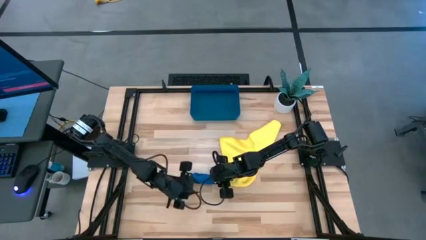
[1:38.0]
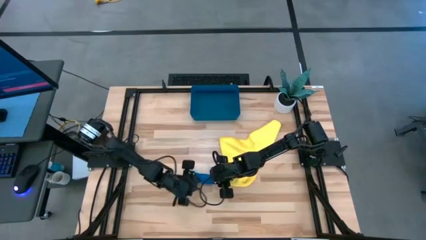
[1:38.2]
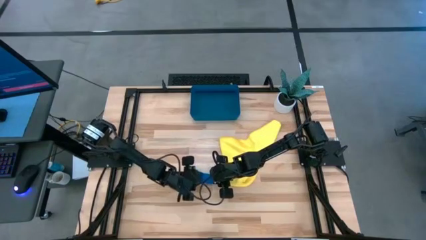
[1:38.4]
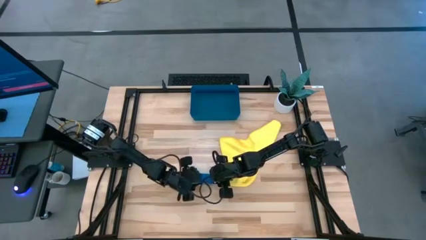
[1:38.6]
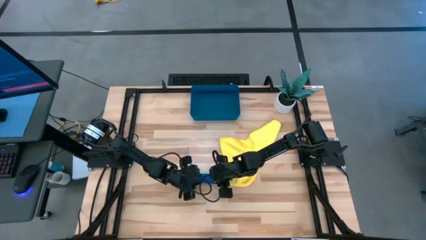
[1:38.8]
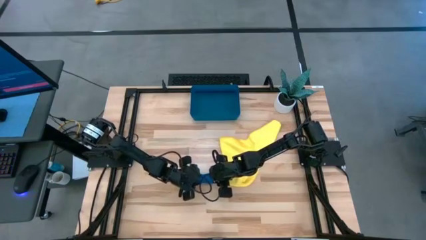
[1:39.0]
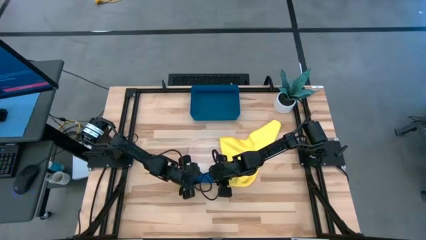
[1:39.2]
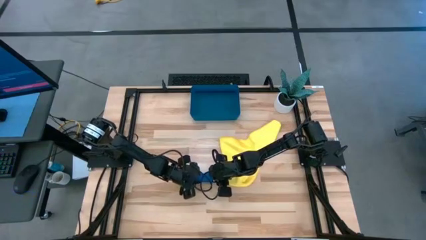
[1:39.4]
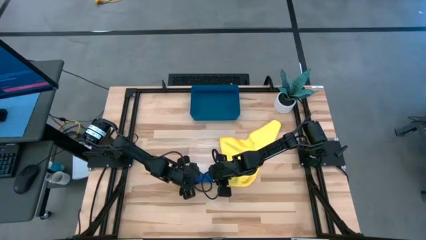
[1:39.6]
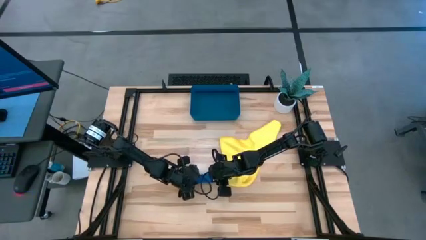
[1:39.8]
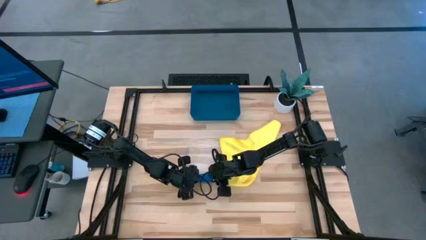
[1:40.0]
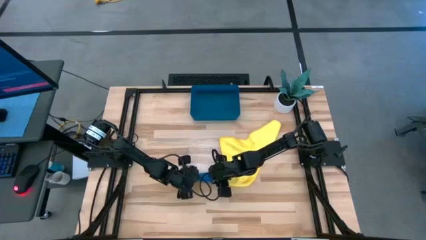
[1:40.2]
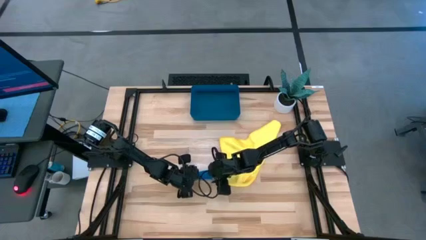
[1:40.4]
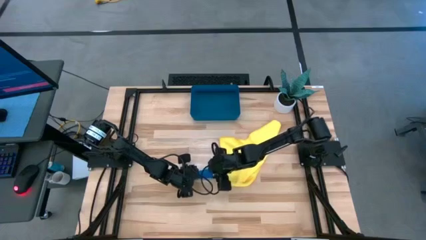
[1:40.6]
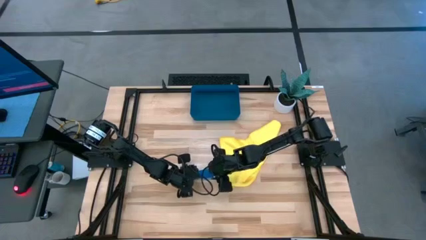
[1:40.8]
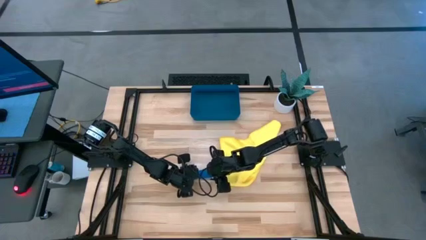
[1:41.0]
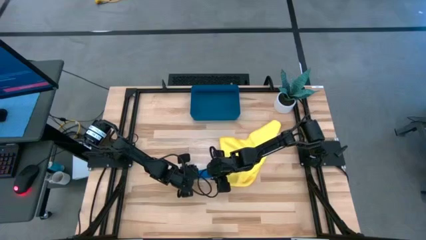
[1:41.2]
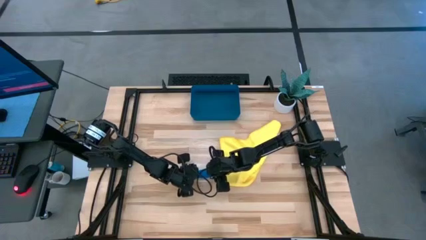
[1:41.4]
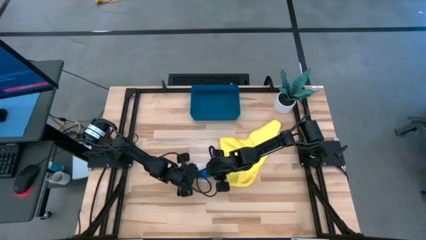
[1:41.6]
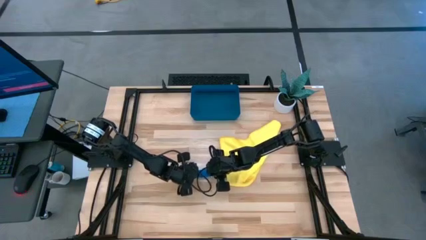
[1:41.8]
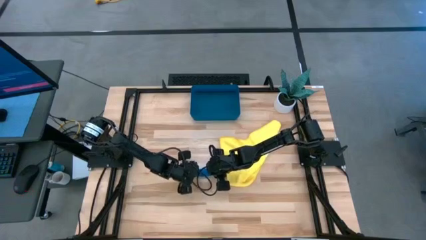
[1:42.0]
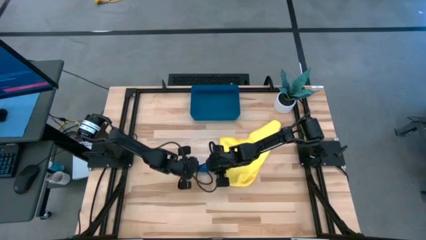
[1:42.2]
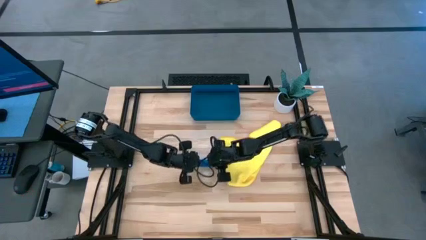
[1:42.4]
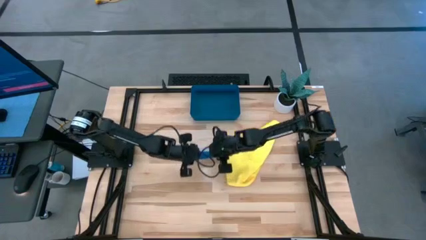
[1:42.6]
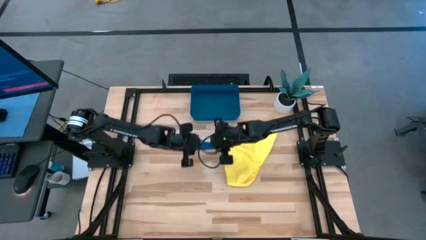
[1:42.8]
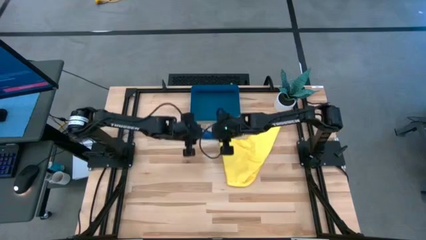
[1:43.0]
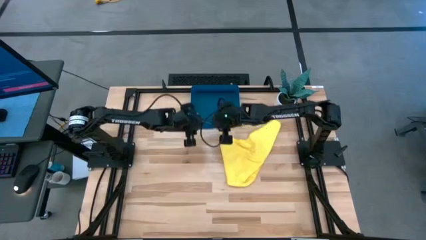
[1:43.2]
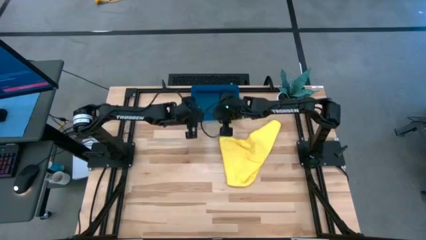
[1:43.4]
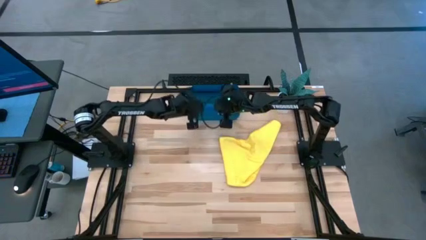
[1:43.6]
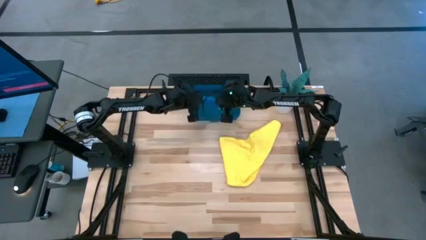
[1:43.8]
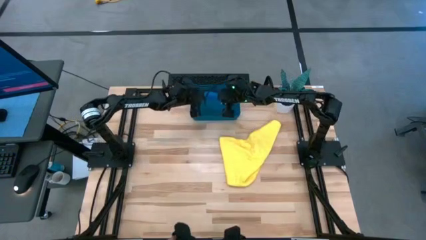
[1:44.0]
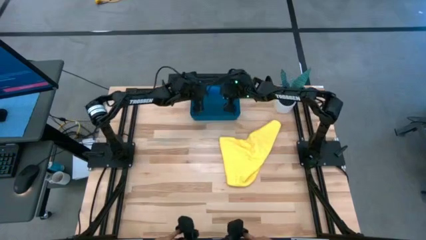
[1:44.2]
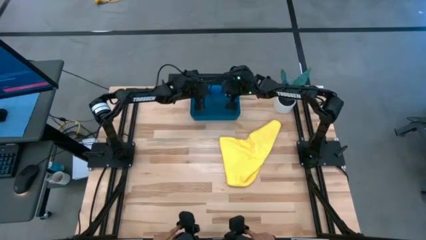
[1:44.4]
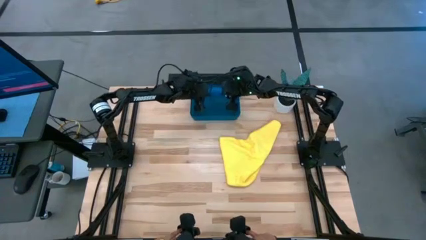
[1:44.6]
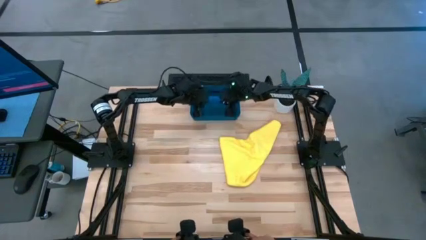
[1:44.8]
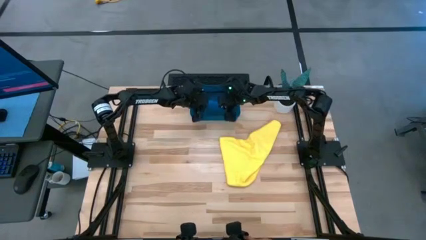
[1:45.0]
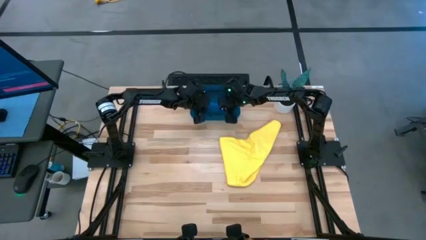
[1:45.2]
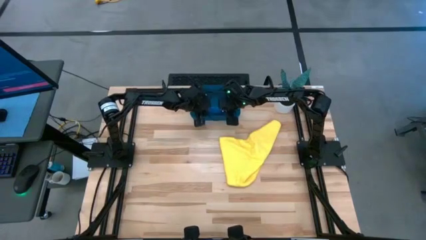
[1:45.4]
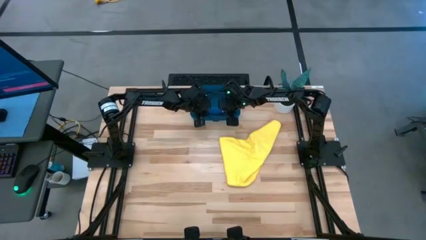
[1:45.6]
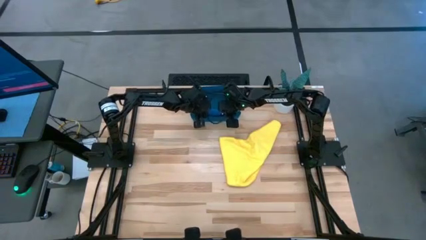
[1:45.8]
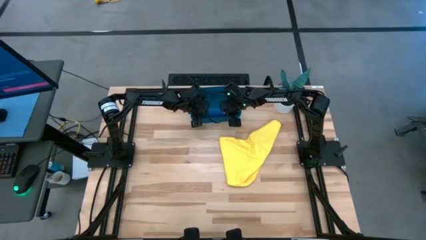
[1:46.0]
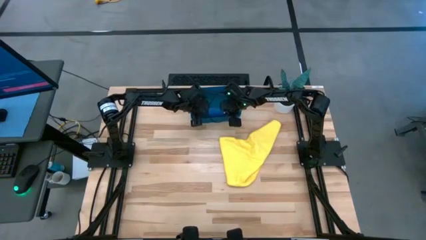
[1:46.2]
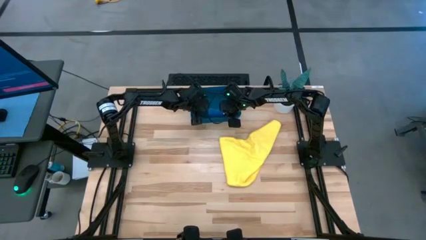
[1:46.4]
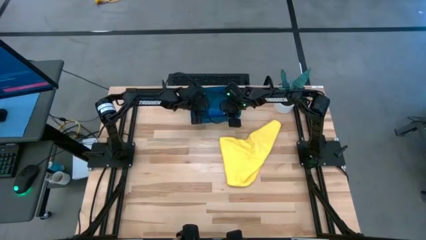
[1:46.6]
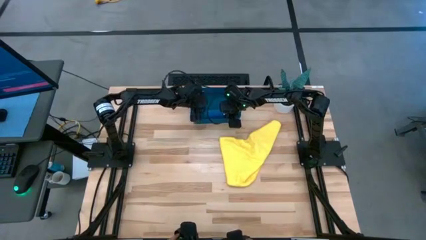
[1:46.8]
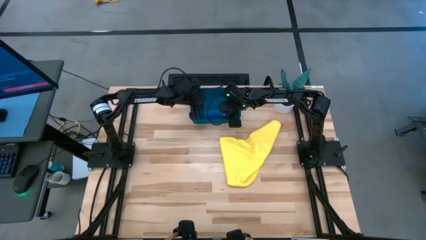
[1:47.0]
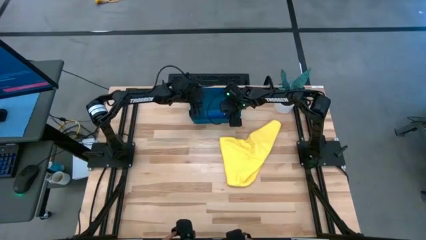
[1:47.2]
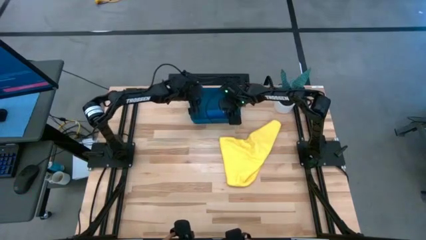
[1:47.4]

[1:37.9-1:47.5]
Task: Roll microfiber towels into tight, uniform cylinder then place into a basket
Put the rolled blue towel into the blue bin

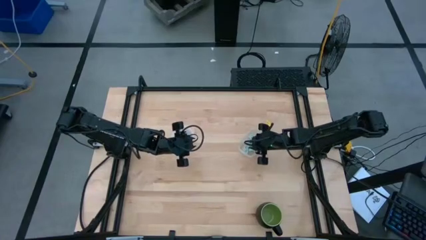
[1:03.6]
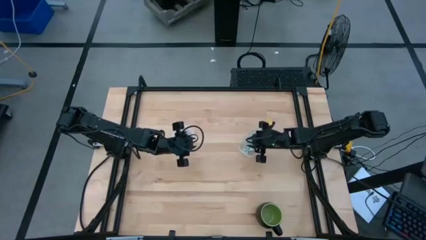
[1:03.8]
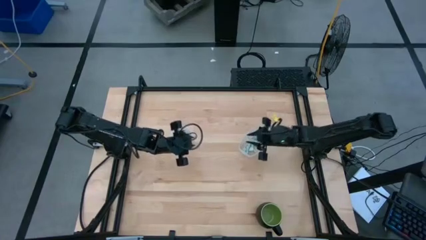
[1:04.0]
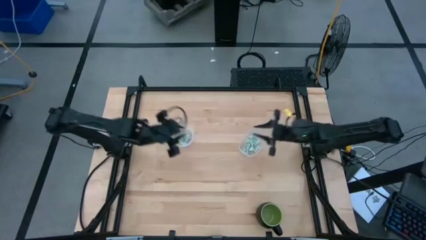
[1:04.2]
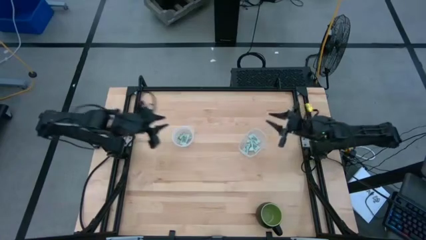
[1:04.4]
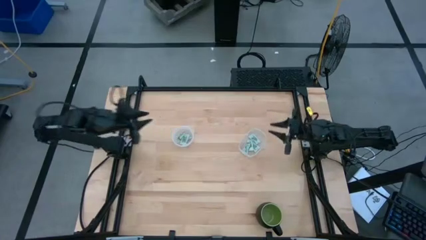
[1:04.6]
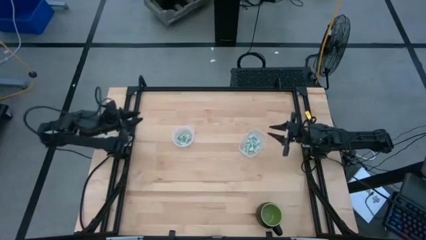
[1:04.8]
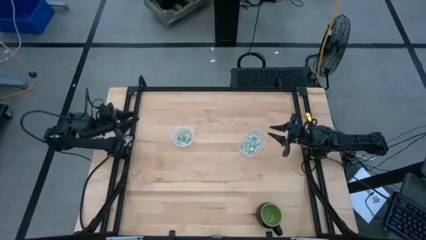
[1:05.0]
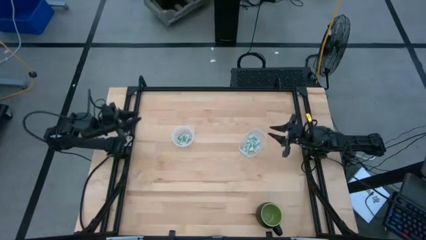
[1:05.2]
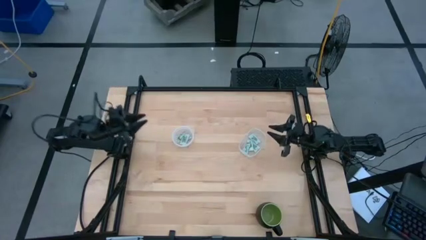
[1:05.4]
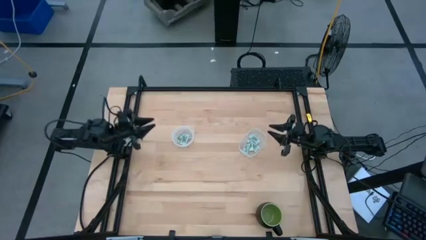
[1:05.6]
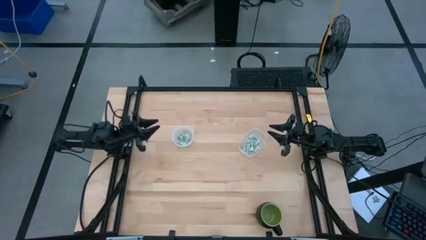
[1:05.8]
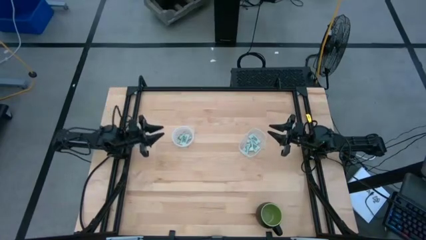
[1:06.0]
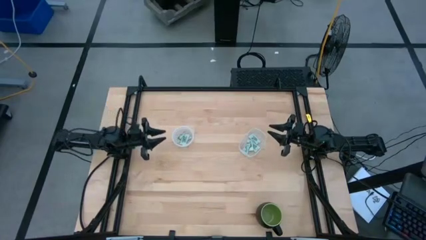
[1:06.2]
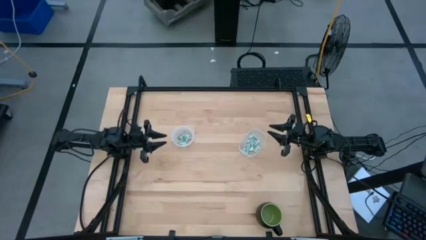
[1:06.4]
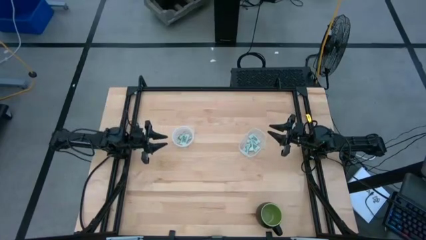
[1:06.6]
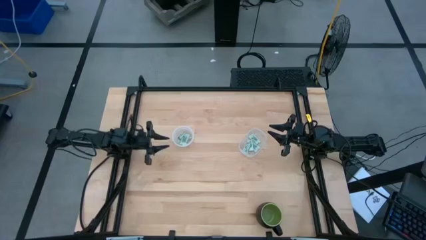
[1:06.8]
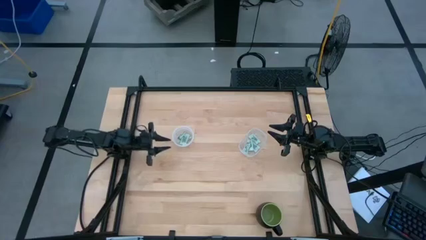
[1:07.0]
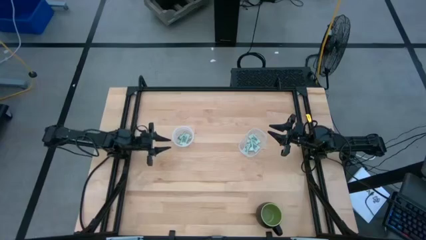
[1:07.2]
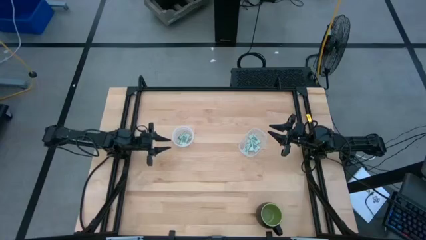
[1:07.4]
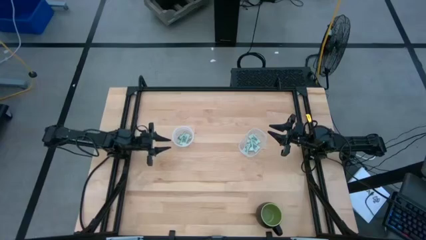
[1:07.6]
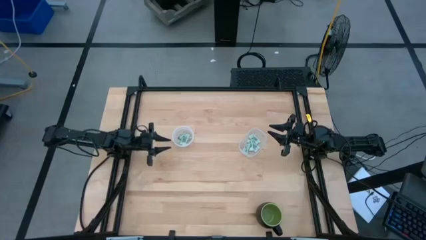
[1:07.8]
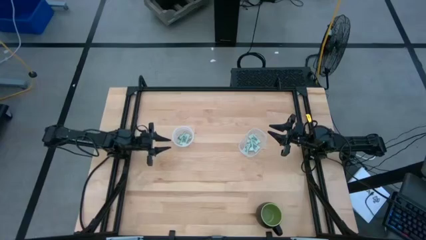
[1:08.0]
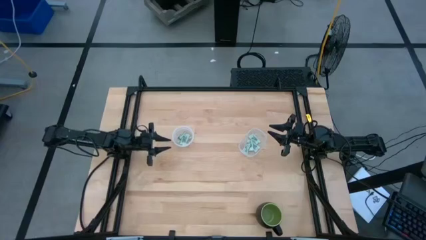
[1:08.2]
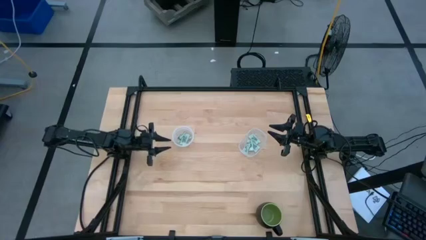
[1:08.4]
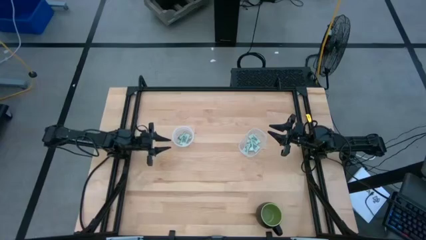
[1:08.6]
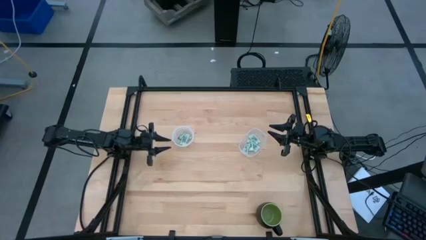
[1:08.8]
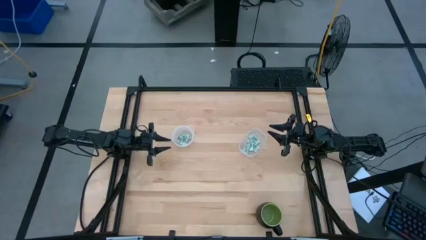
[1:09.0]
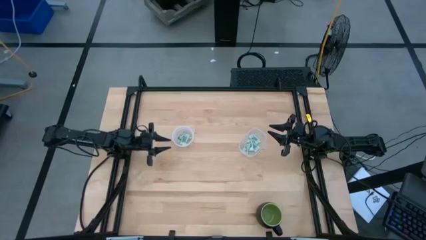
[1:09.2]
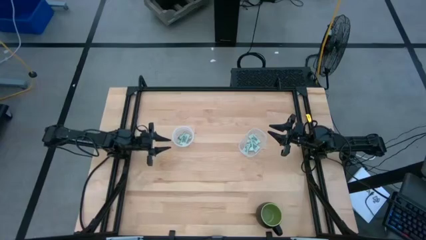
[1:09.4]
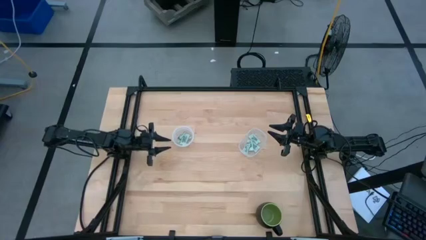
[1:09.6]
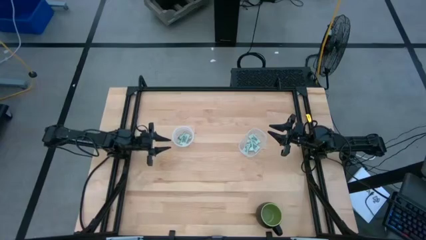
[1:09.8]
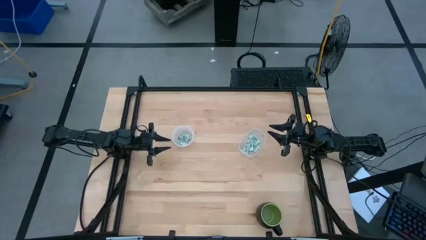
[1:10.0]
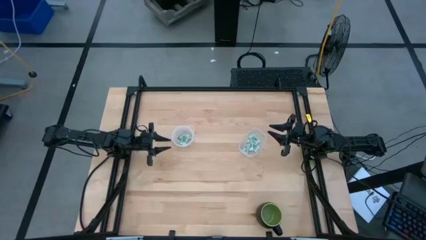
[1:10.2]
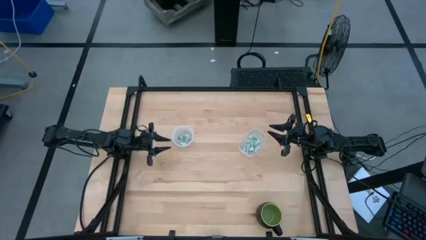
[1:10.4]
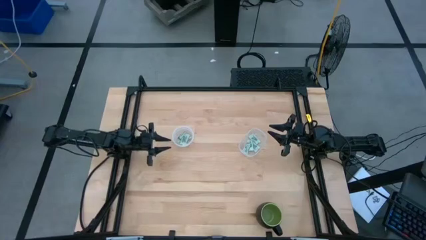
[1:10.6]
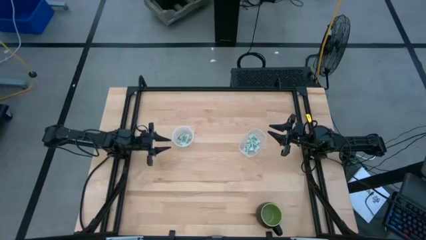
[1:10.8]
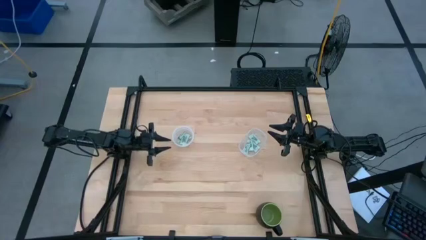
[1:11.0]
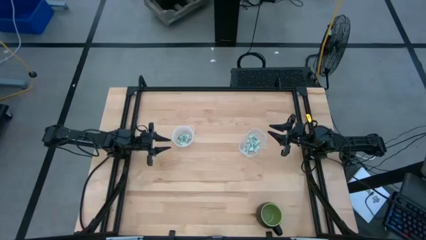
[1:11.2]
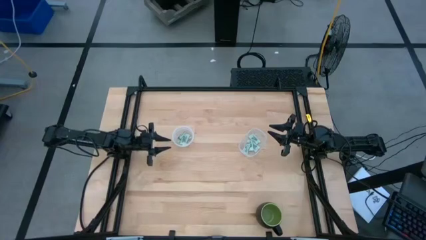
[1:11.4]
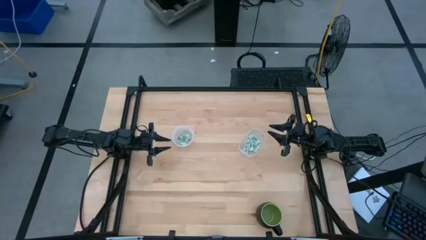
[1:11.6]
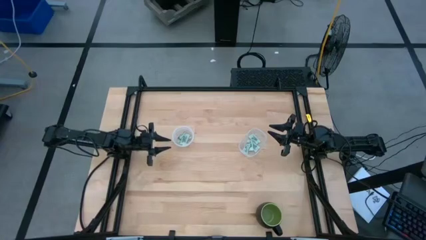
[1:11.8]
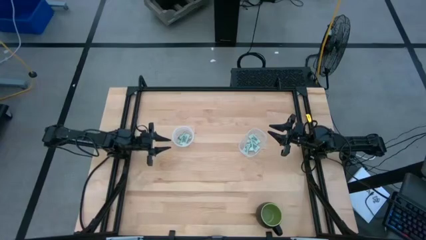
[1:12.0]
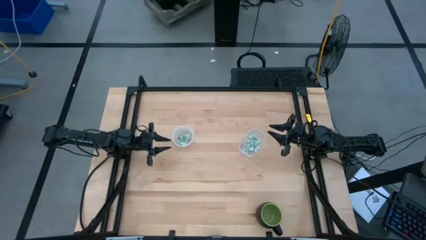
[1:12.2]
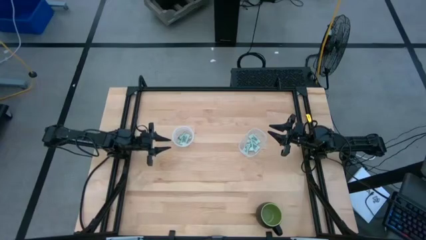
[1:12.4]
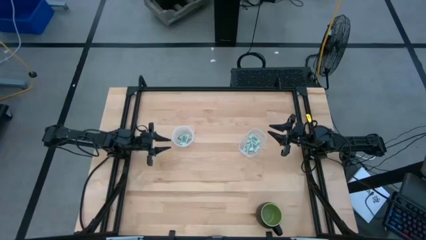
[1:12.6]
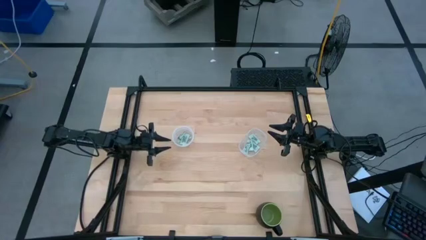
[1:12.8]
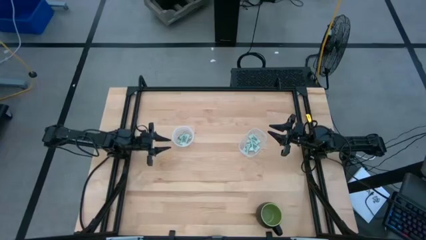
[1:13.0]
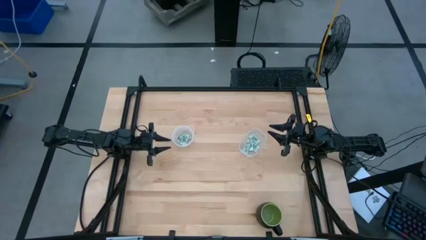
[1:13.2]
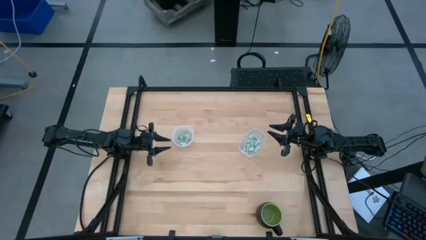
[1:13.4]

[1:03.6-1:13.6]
Task: Pick and place Stevia / Truvia into bins
Return to Home Position
